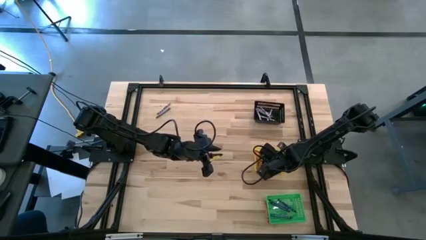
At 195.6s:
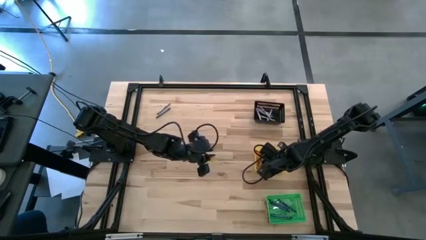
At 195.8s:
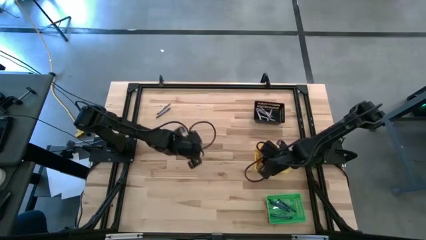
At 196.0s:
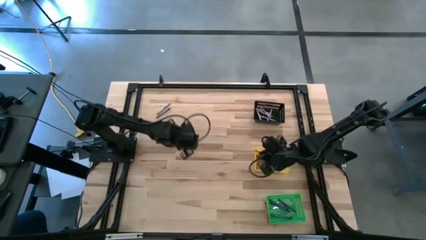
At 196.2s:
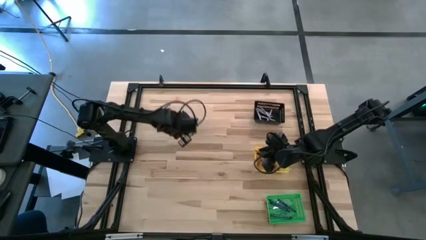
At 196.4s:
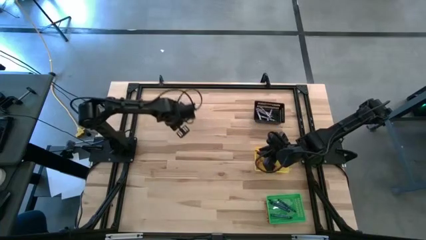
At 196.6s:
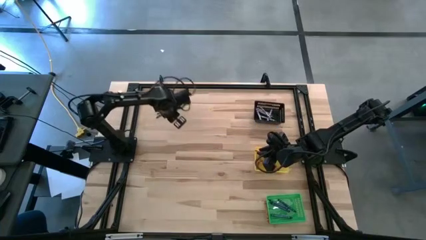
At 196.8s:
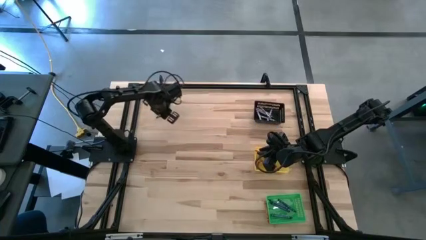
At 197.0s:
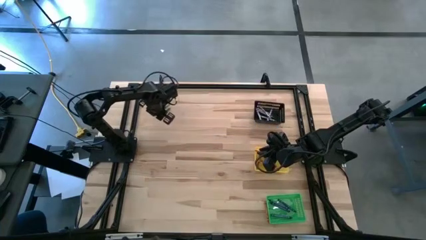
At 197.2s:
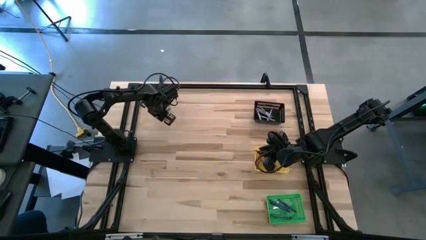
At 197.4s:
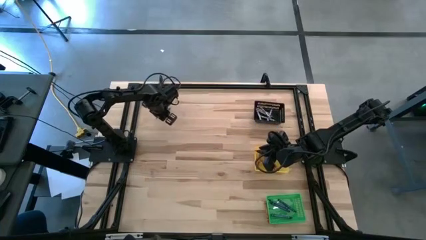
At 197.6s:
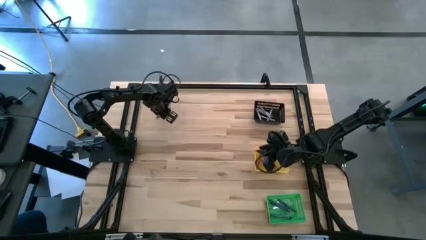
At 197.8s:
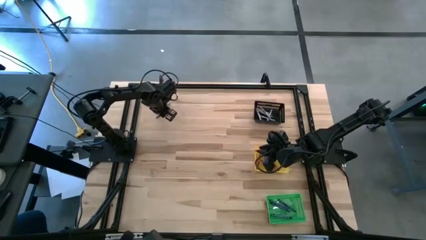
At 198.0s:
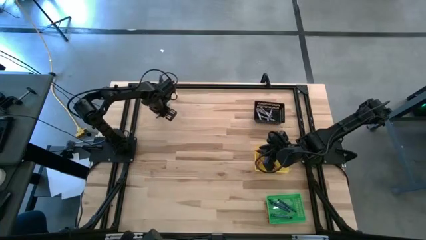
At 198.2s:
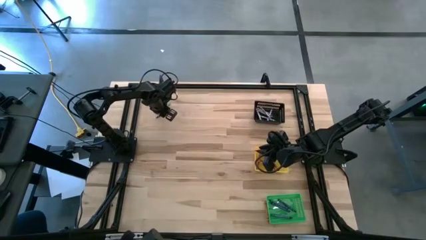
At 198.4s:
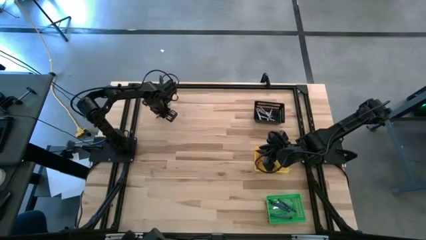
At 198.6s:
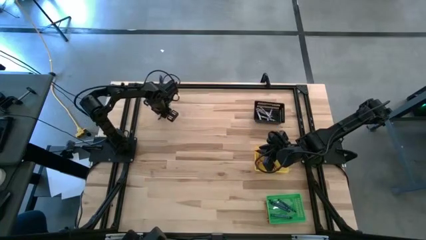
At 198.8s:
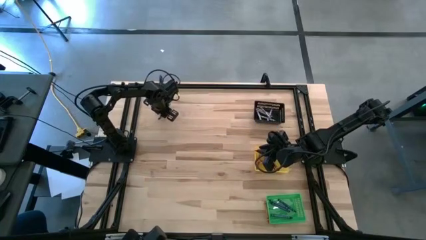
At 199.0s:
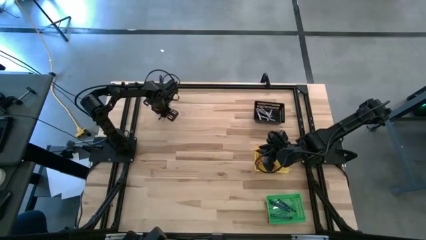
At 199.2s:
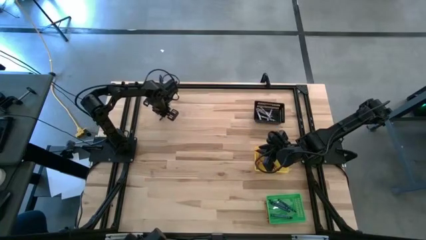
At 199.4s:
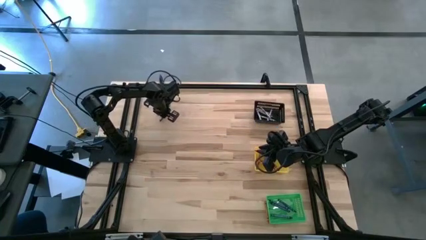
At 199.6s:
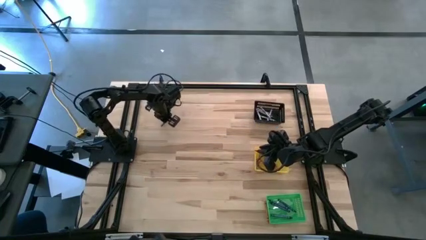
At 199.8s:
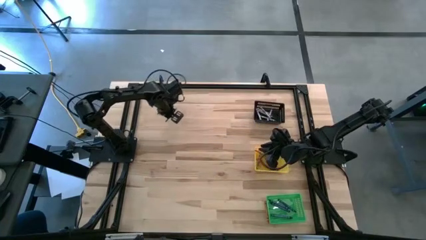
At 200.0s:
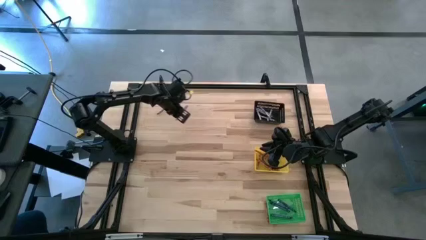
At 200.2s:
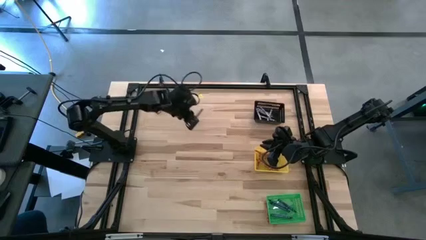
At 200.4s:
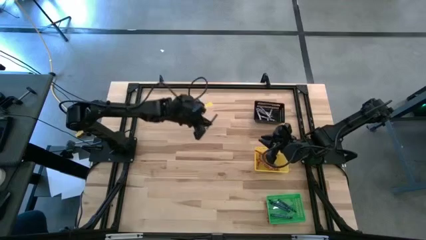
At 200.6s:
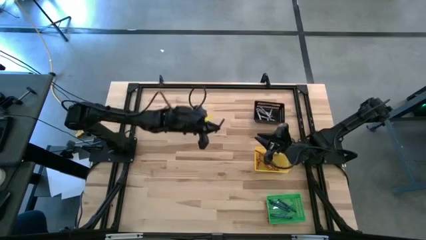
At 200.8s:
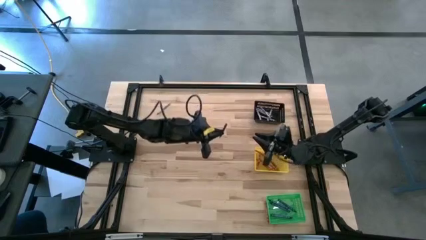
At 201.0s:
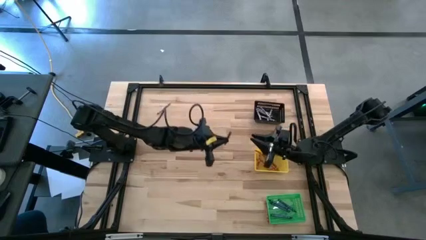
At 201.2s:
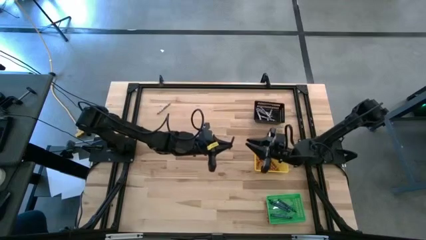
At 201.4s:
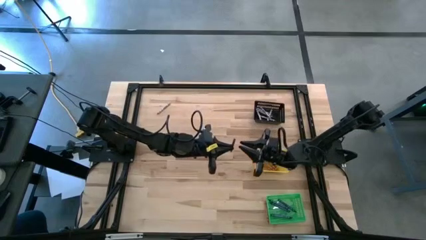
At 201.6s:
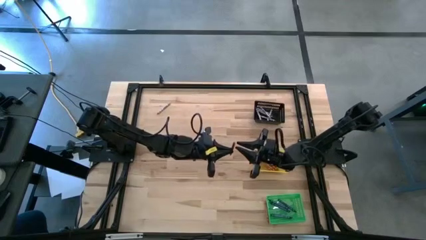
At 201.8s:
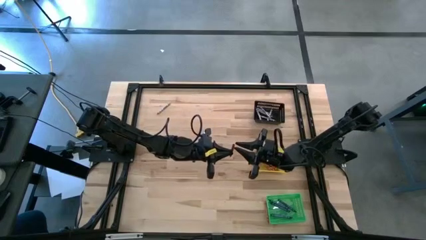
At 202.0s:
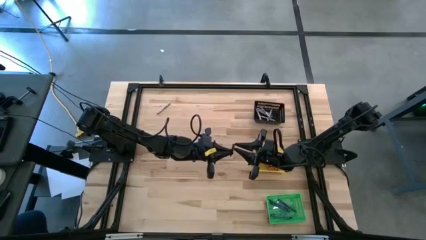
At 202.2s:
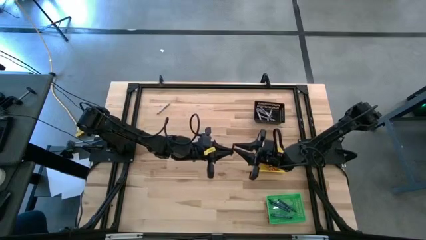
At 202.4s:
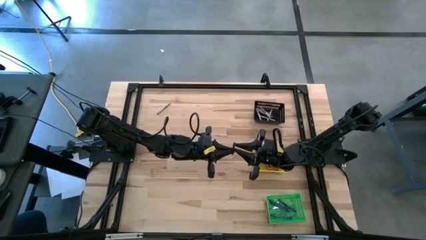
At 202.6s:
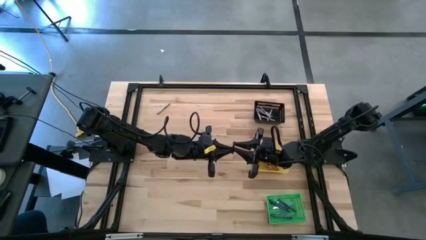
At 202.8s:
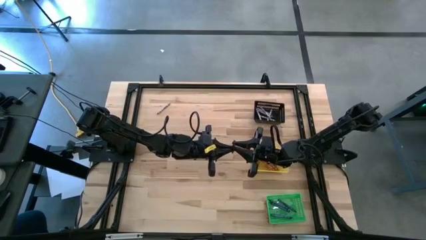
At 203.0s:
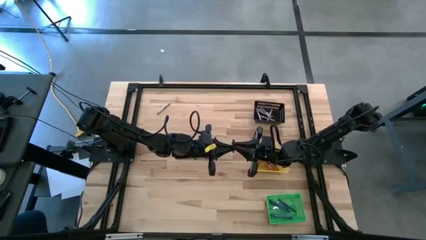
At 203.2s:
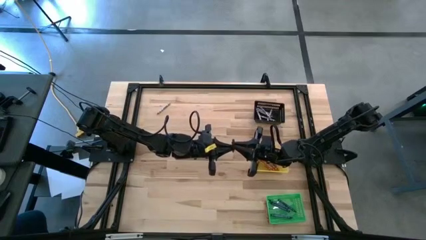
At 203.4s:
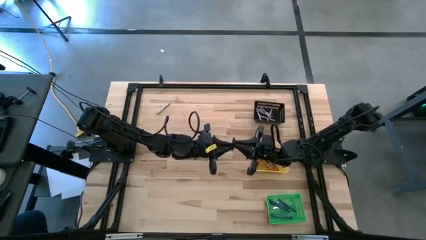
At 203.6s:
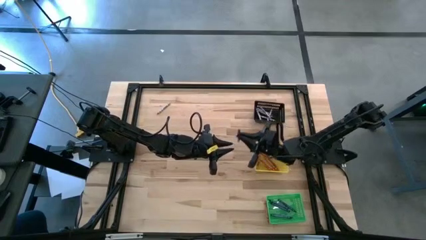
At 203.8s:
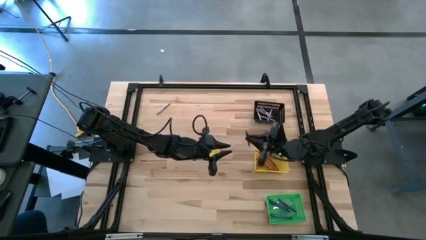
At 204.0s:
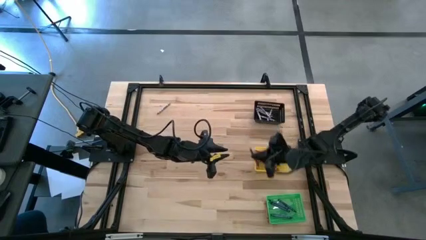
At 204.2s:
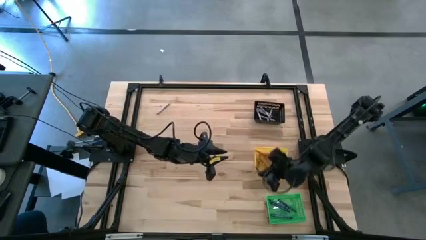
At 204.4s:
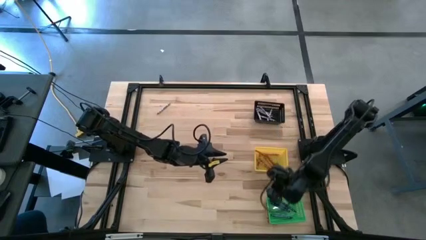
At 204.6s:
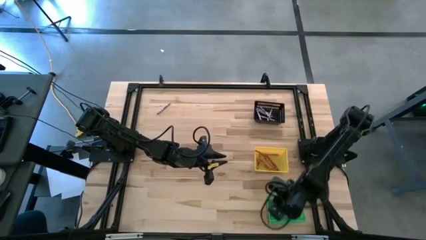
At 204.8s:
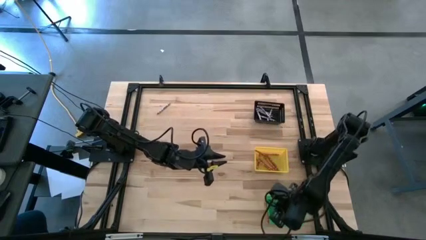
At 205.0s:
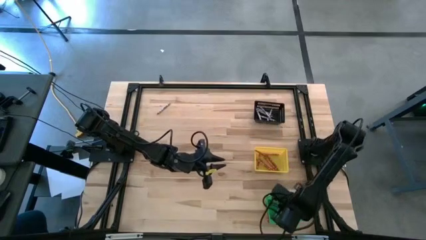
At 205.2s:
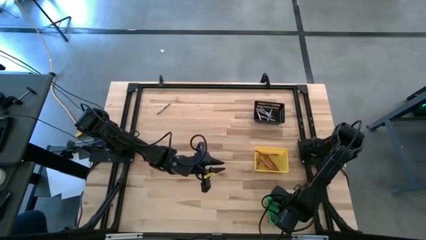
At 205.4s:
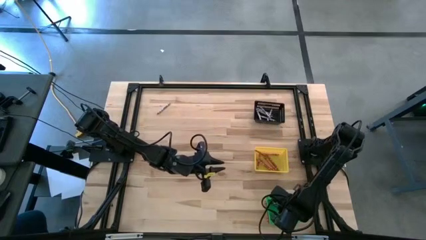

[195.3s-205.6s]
Task: Sort crayons
Put the blue crayon into the green basket

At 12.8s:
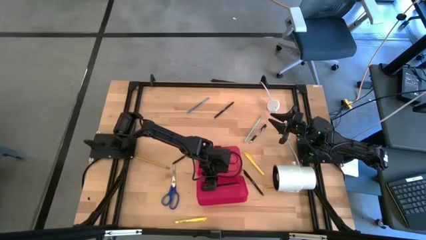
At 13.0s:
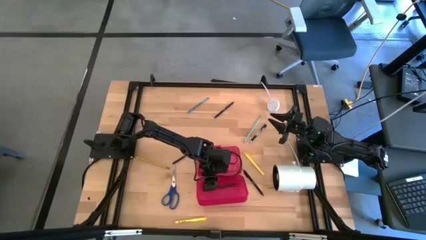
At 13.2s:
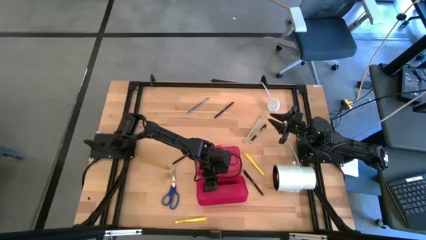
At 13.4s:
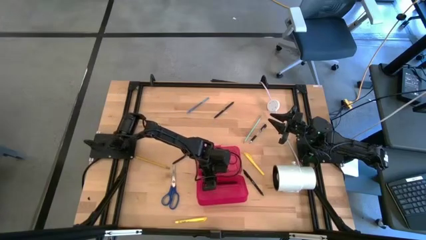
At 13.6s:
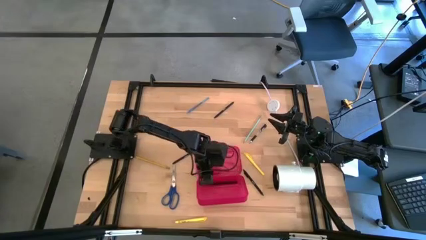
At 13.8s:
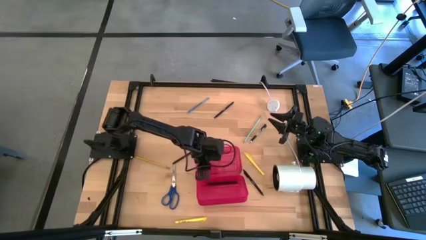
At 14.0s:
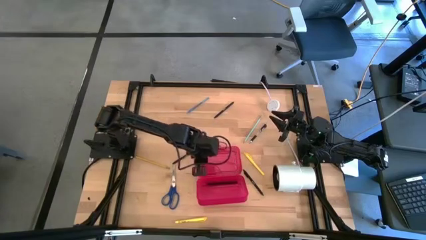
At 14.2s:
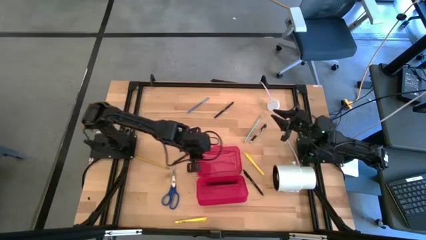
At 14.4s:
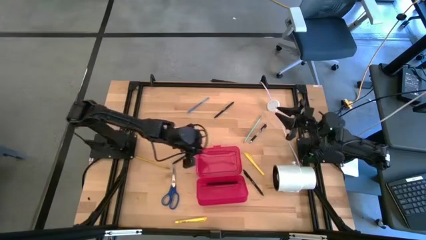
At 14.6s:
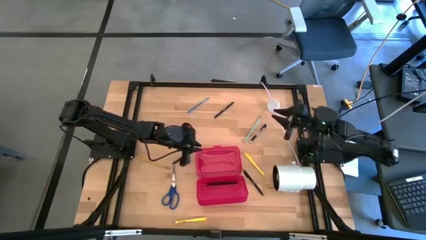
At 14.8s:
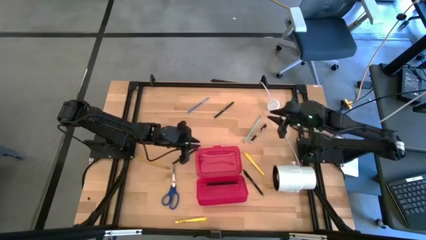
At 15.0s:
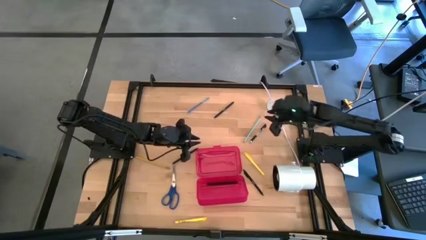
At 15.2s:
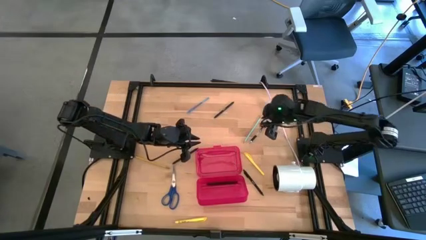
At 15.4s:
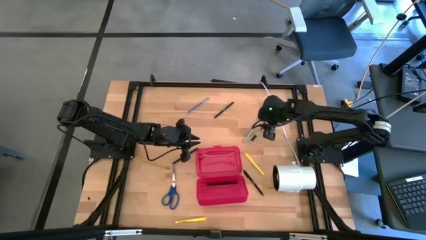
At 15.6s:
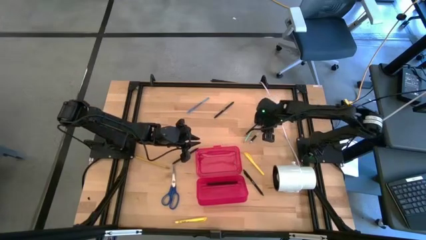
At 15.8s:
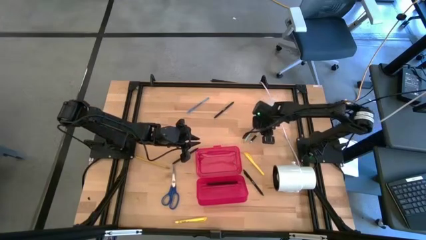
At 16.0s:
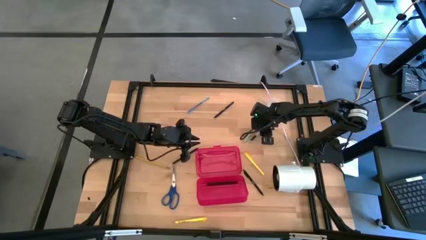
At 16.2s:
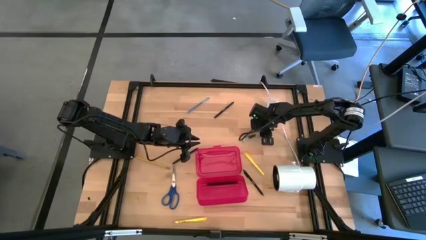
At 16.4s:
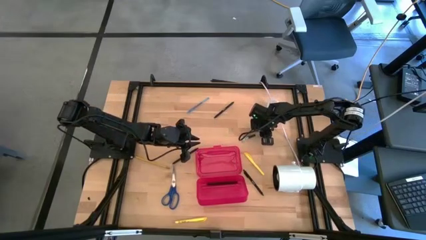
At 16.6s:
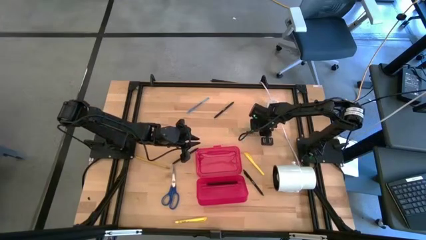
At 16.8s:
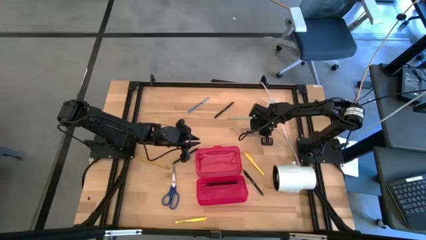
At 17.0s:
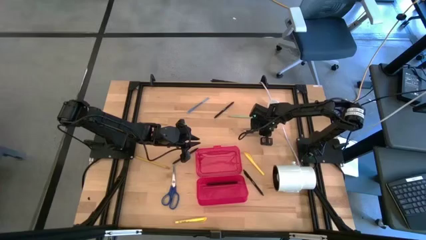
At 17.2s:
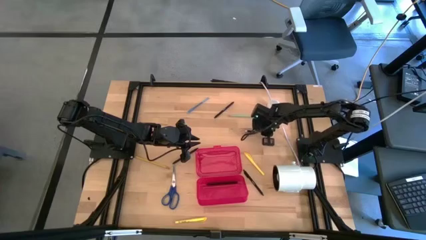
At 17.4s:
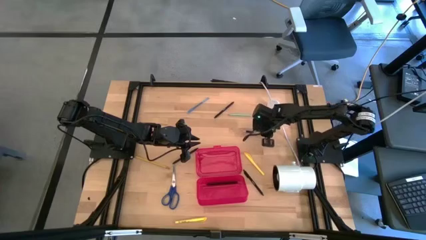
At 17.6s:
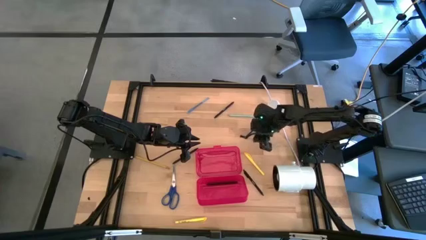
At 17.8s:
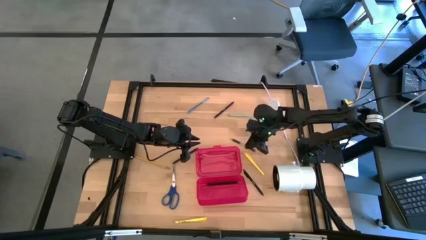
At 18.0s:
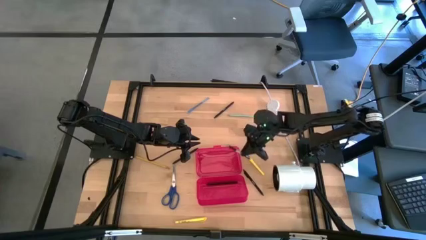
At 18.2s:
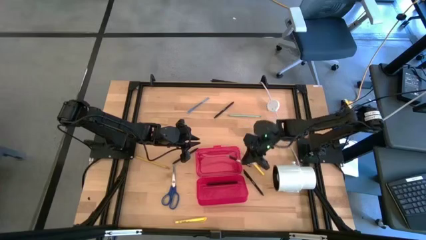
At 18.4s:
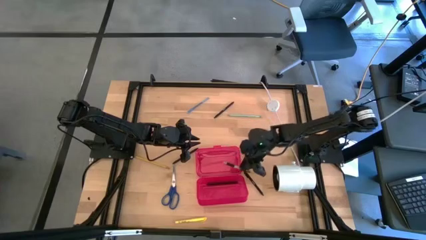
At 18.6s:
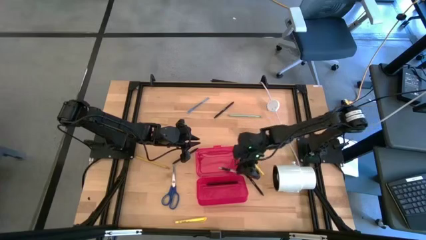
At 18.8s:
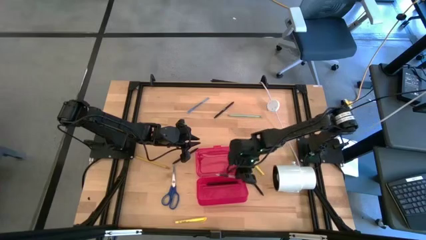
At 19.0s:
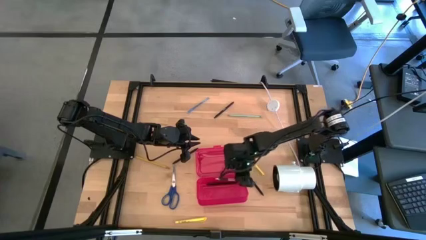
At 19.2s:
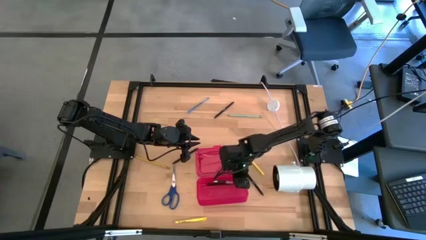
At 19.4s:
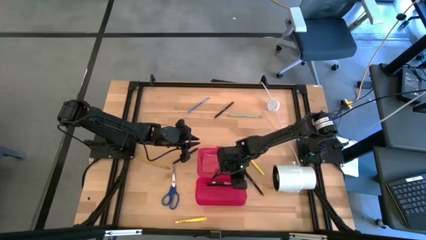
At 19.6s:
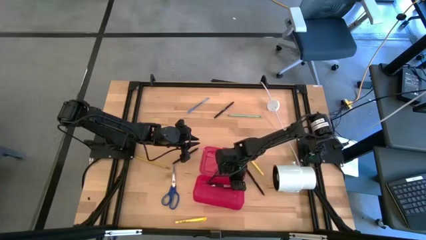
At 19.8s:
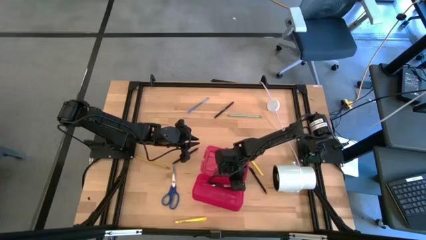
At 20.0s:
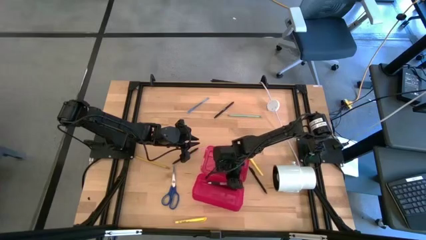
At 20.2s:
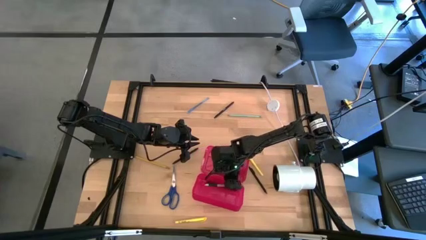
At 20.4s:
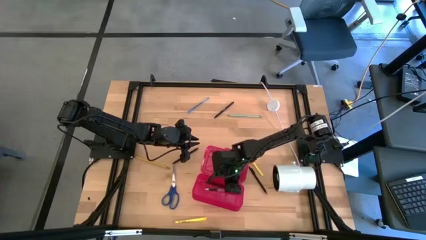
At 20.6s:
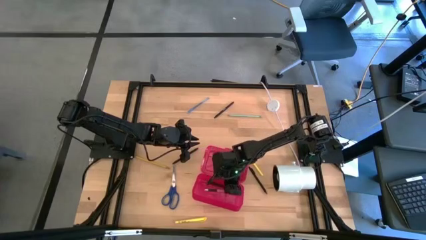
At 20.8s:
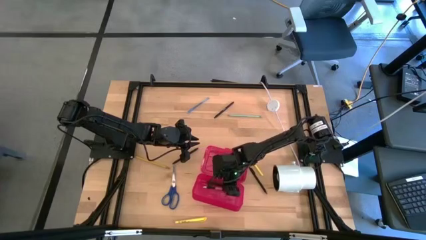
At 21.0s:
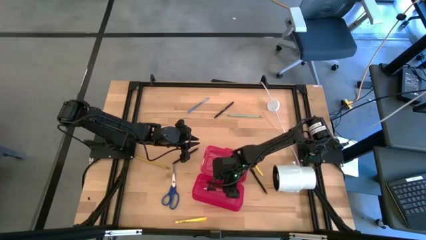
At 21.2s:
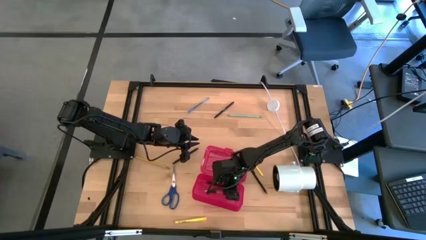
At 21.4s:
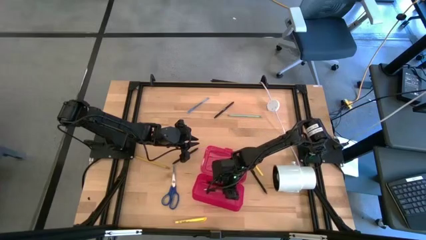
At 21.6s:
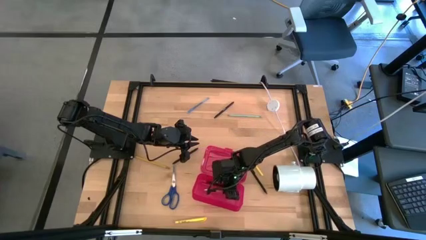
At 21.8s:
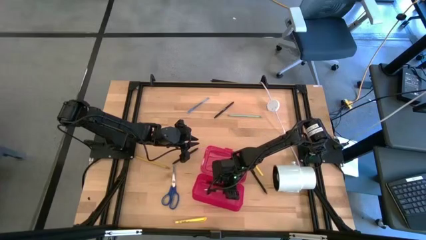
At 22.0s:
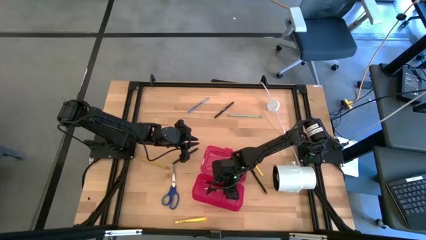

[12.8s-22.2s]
Task: Pick & place school supplies into a supply box
Put the black and white pen into the red supply box
